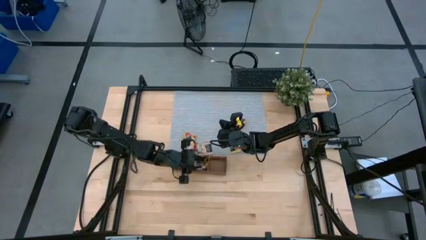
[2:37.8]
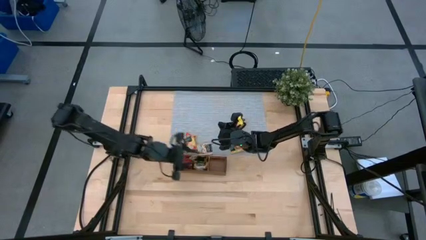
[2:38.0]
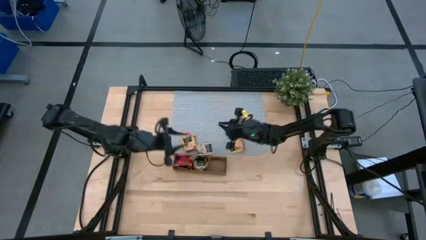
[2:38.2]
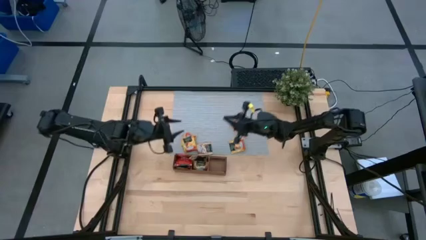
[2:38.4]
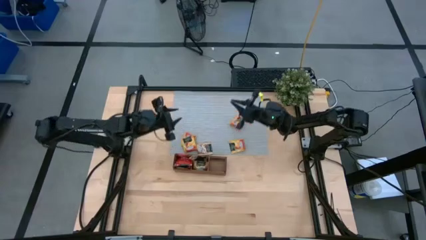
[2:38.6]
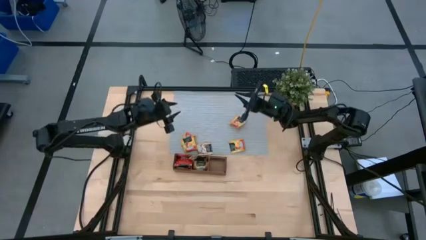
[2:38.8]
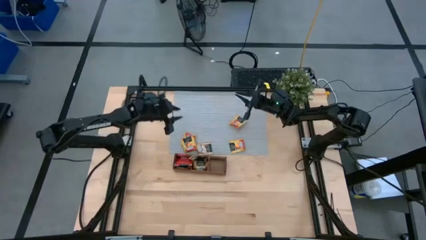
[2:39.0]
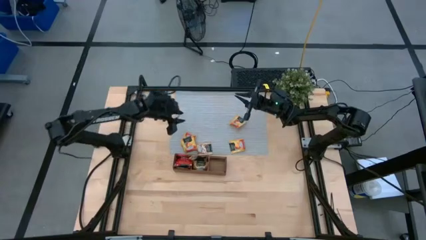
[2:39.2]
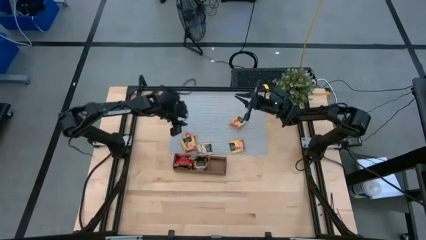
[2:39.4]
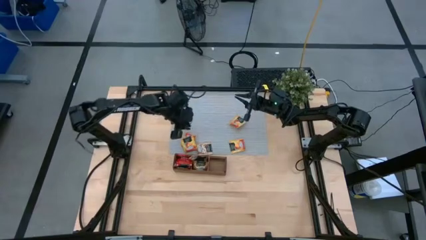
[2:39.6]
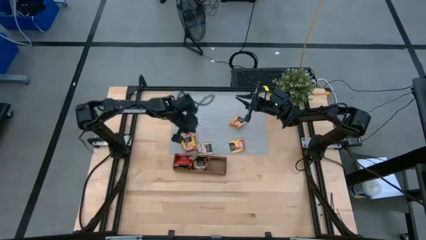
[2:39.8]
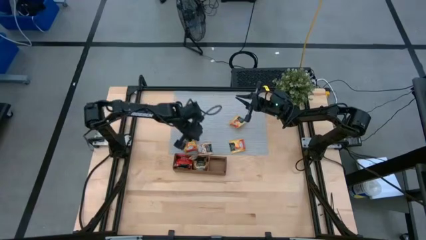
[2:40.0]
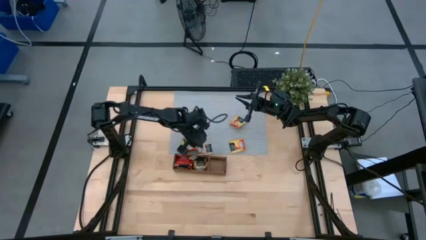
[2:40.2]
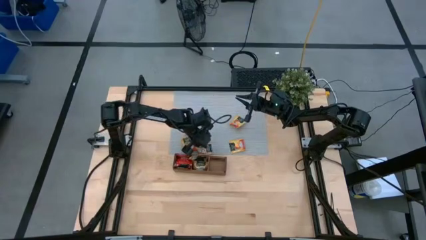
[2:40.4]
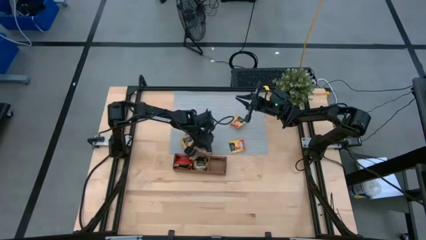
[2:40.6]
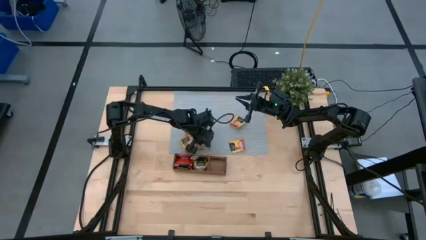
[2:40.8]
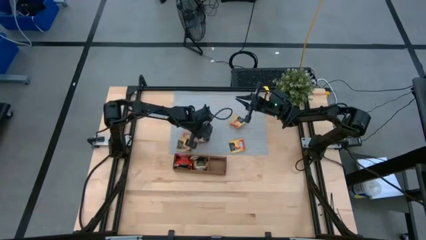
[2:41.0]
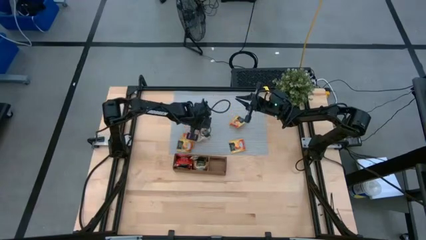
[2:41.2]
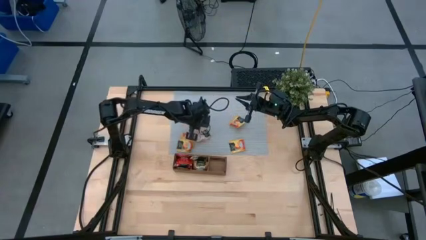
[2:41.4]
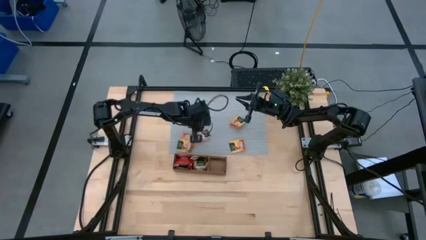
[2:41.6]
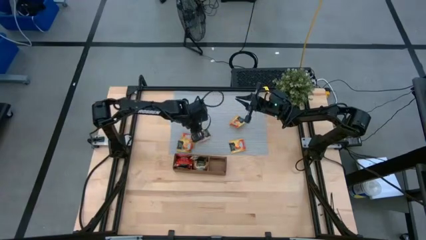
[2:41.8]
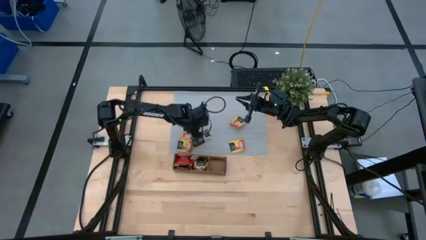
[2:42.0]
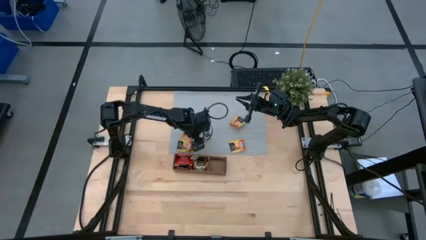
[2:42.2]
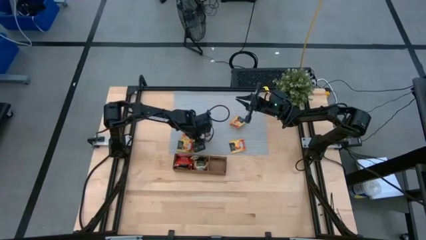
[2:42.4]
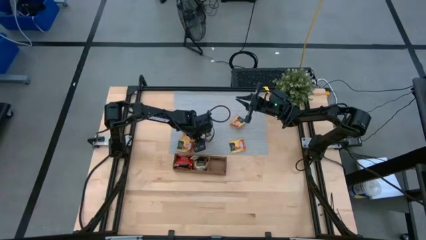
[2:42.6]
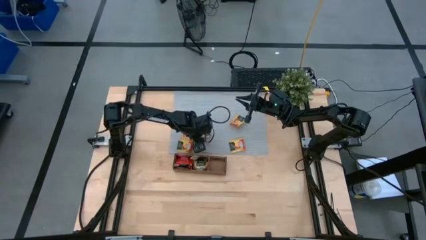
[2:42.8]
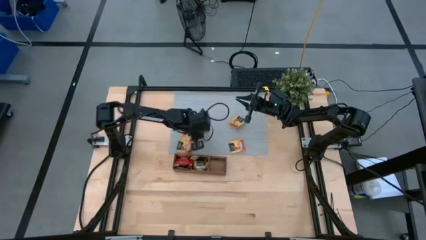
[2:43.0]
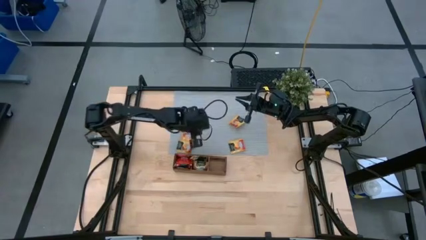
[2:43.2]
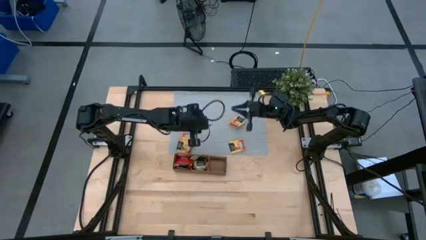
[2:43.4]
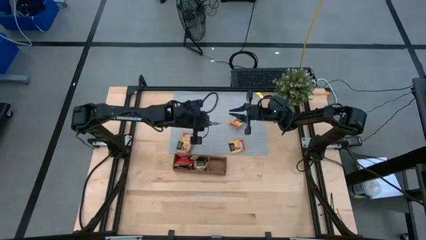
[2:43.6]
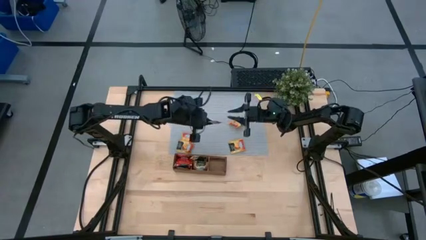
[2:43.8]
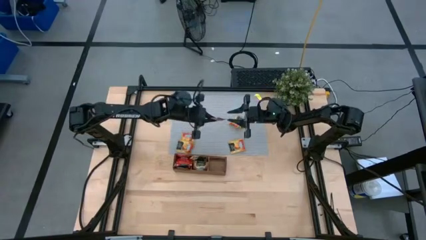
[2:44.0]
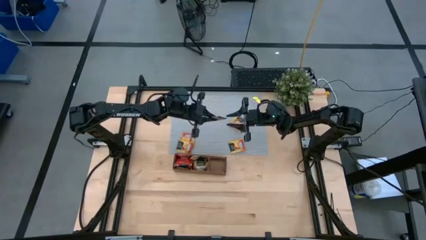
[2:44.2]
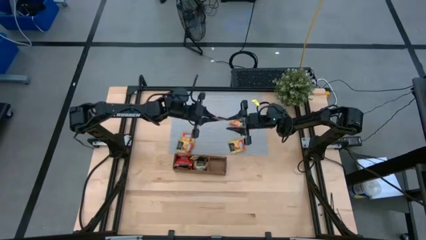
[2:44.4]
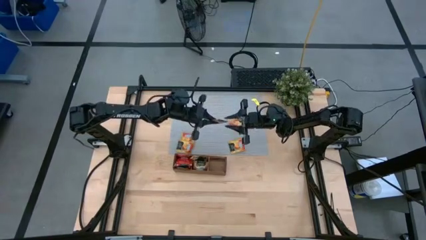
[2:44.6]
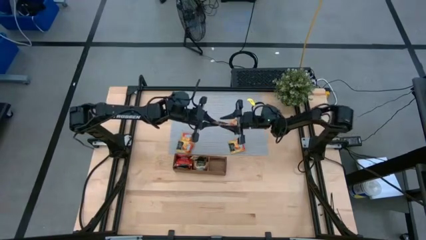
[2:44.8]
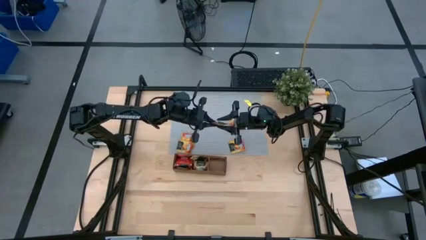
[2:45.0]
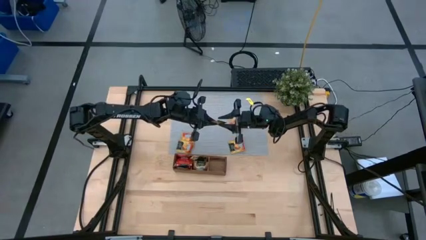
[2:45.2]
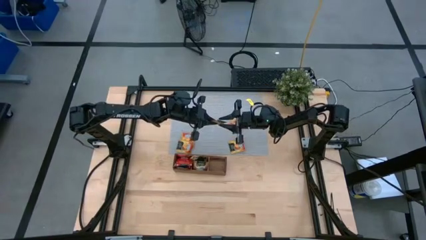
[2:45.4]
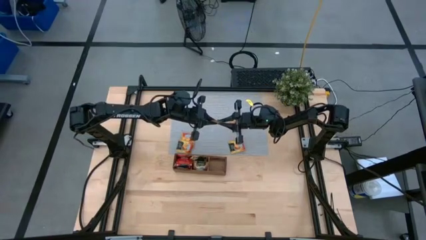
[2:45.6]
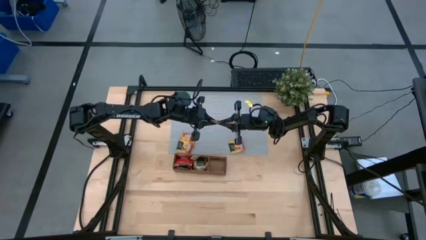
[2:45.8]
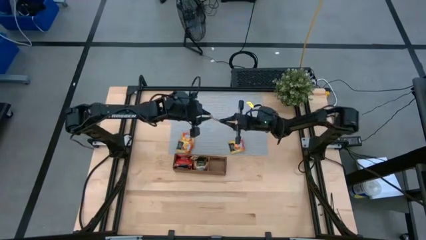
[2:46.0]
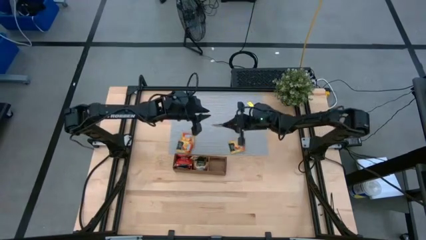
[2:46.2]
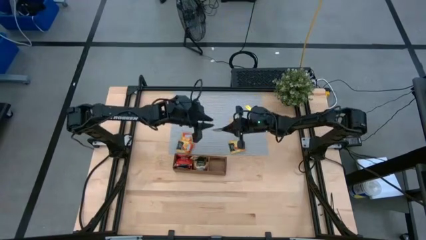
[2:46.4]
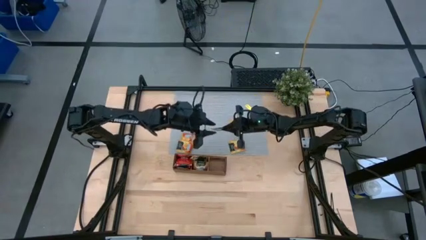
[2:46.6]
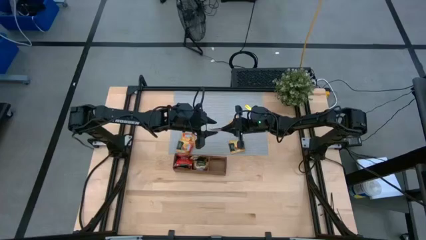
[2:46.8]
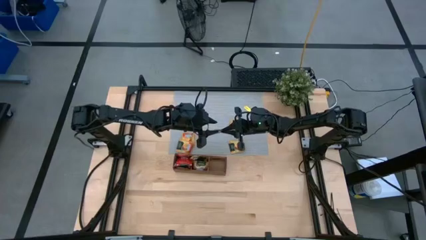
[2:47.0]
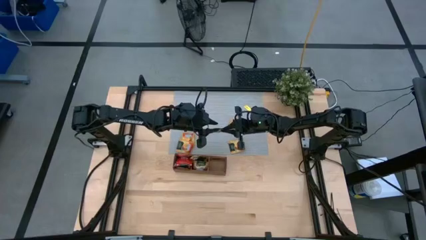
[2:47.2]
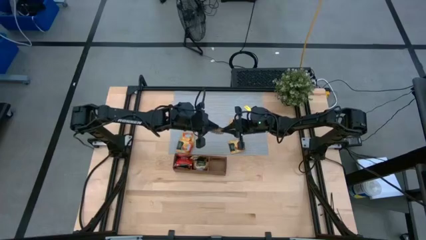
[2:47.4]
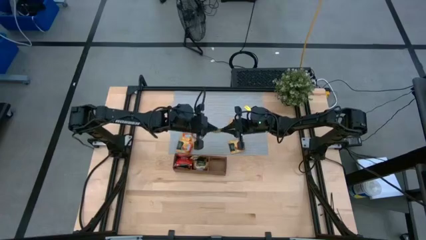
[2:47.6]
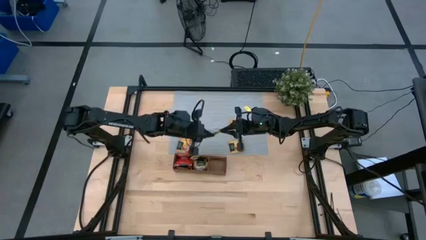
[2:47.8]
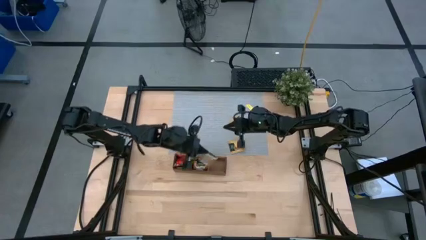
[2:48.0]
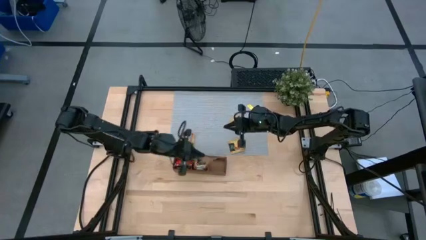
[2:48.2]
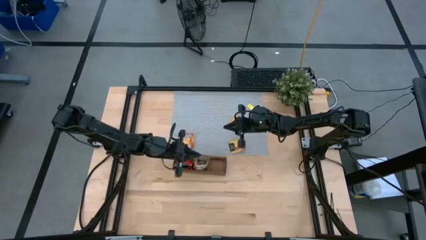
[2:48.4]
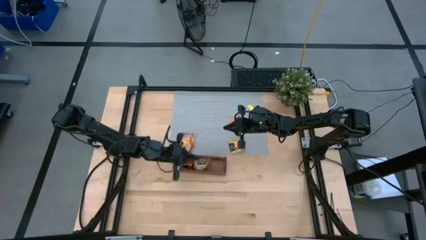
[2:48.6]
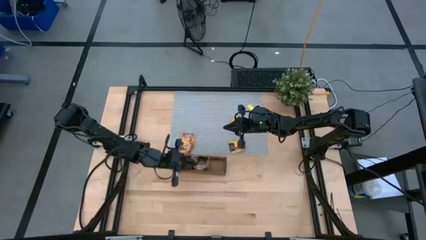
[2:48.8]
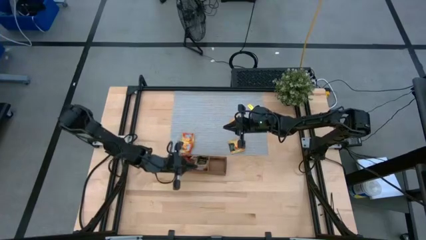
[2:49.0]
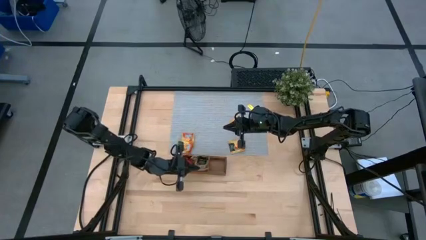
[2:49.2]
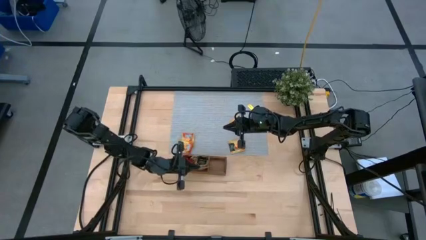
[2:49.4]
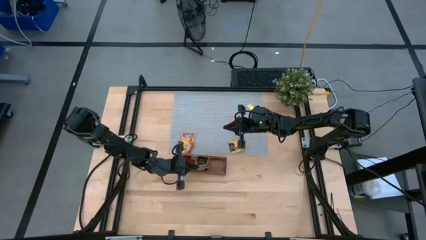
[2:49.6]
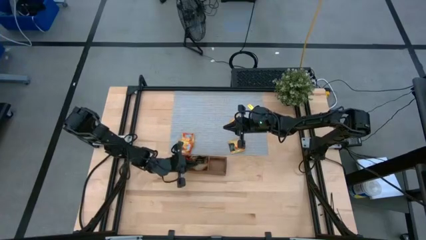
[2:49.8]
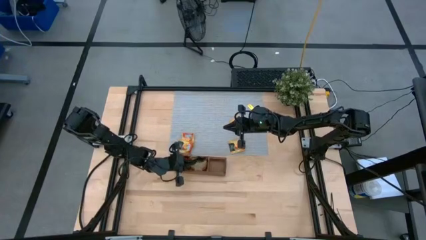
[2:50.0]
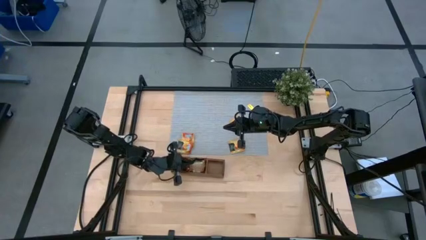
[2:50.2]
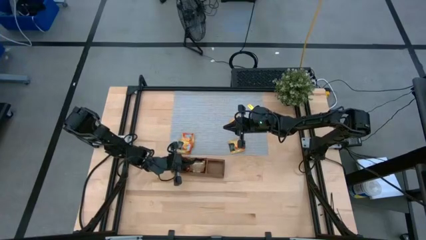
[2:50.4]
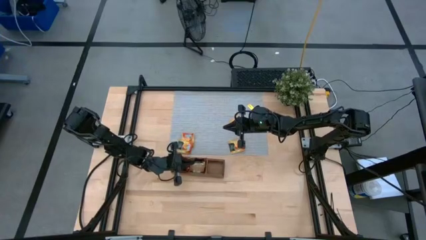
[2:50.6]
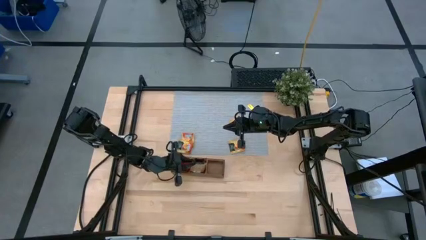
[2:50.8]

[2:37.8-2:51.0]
Task: Pick & Place Tea
Put the brown tea bag into the middle section of the wooden organizer
